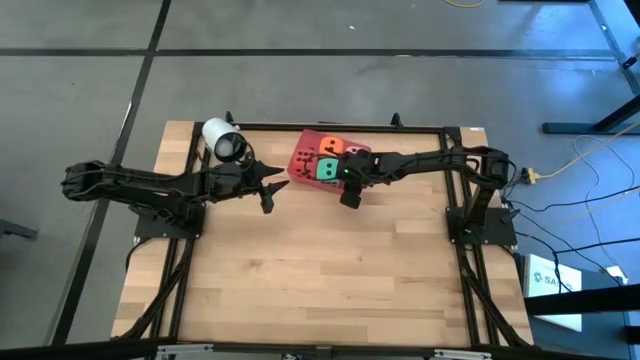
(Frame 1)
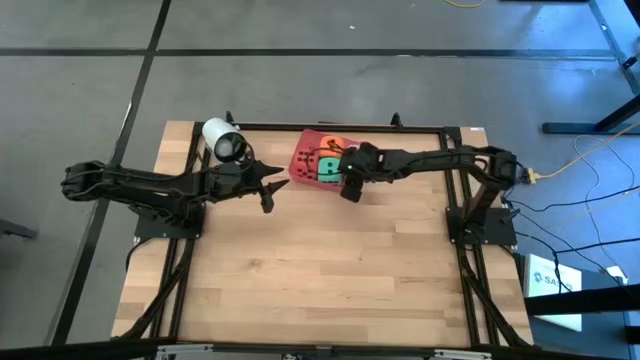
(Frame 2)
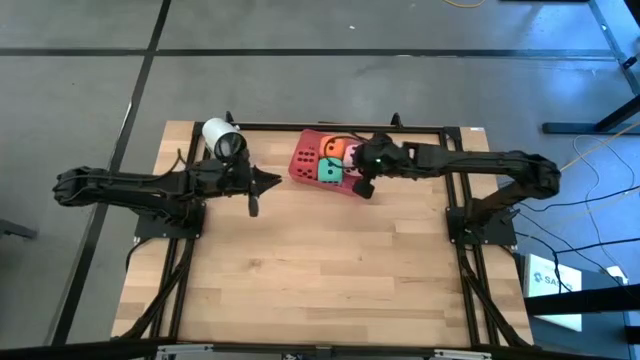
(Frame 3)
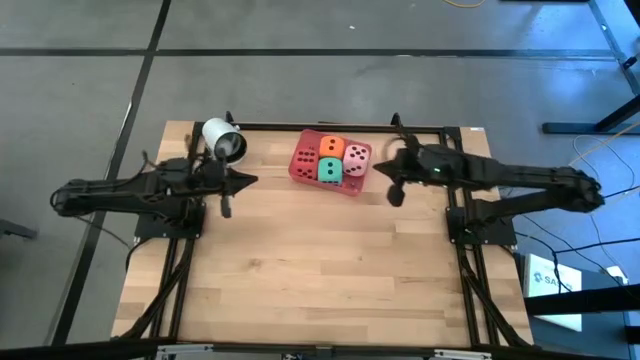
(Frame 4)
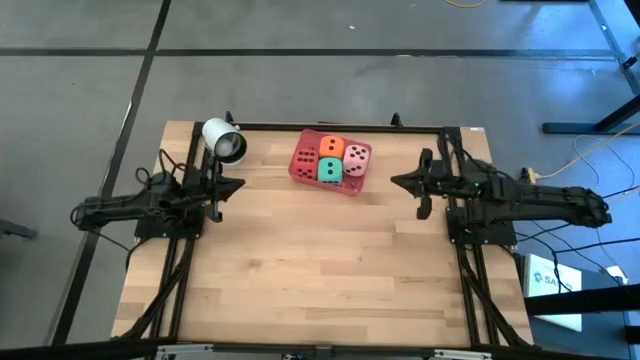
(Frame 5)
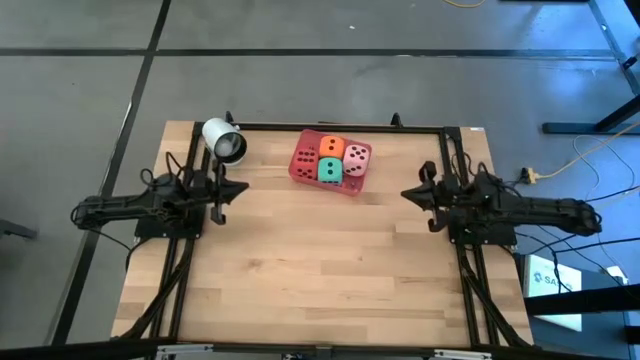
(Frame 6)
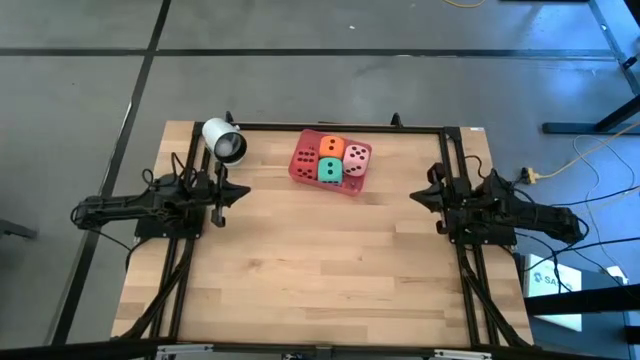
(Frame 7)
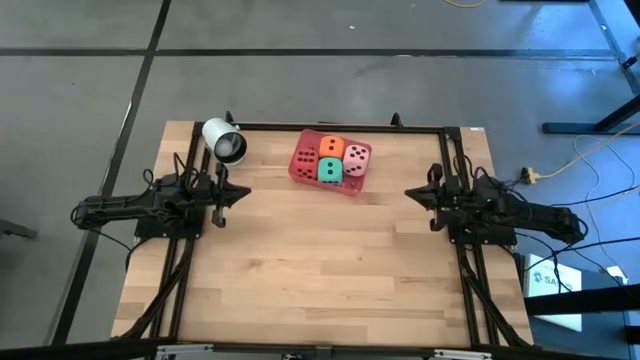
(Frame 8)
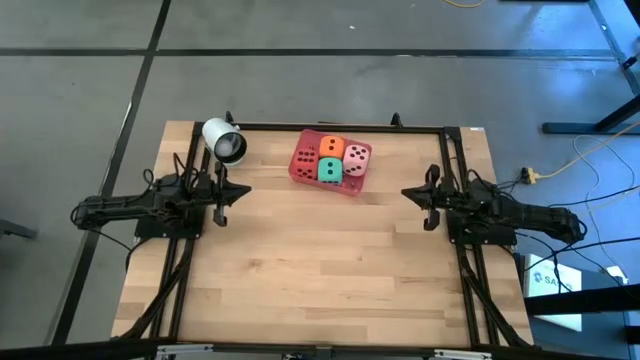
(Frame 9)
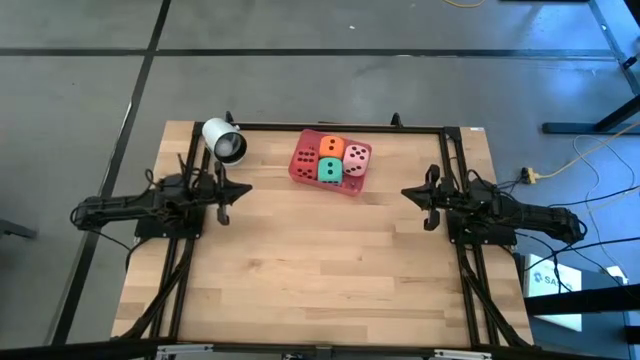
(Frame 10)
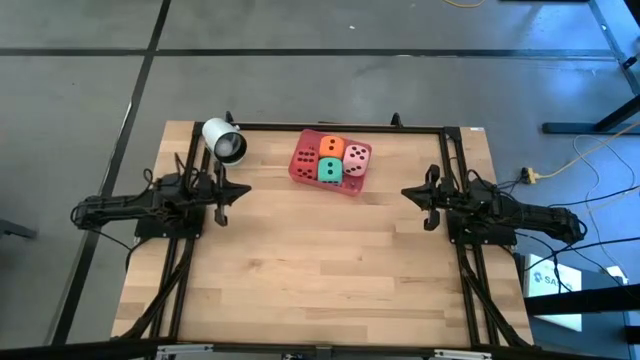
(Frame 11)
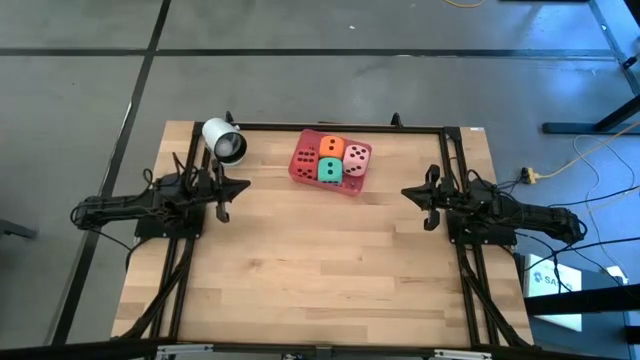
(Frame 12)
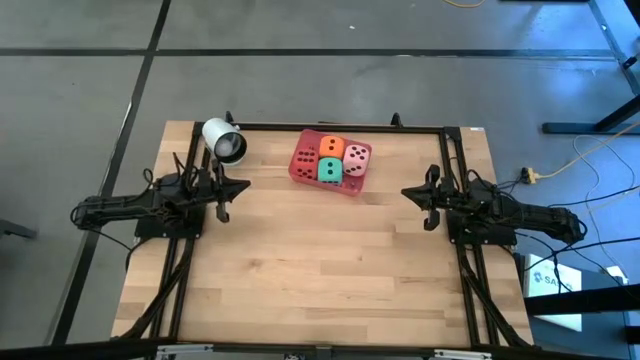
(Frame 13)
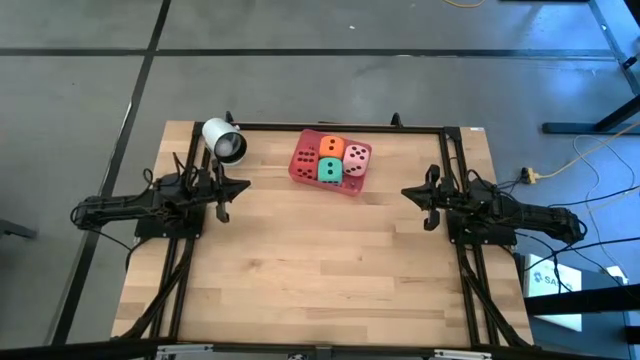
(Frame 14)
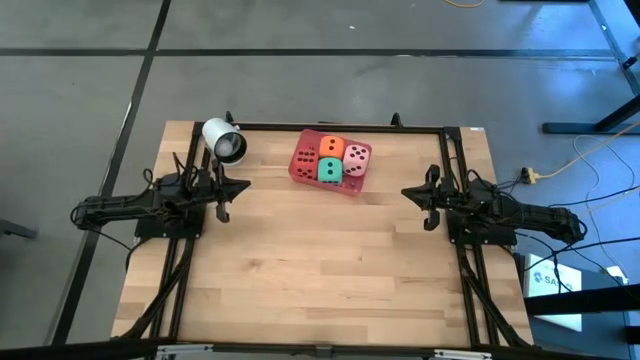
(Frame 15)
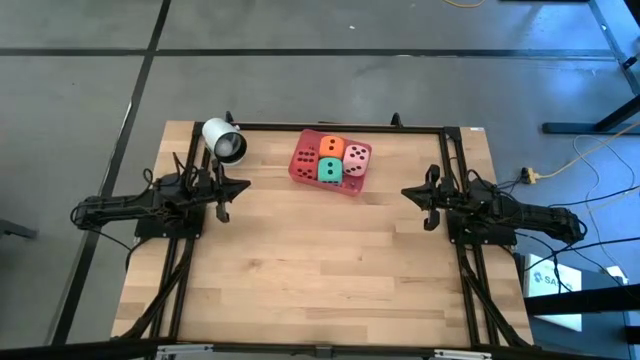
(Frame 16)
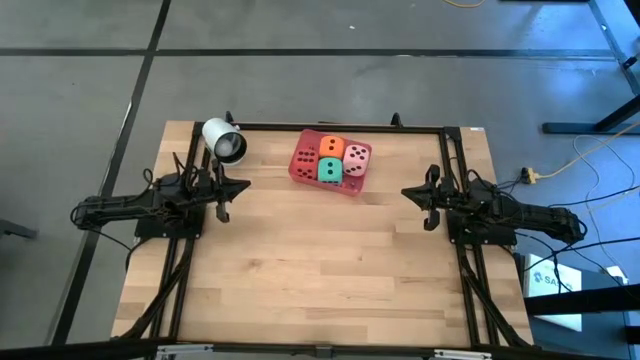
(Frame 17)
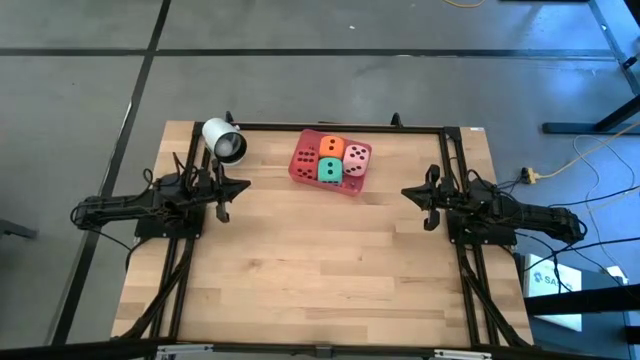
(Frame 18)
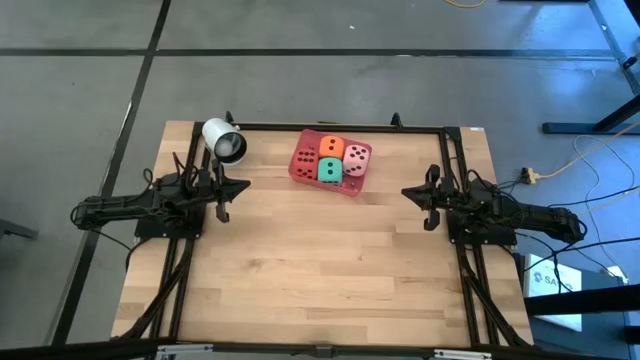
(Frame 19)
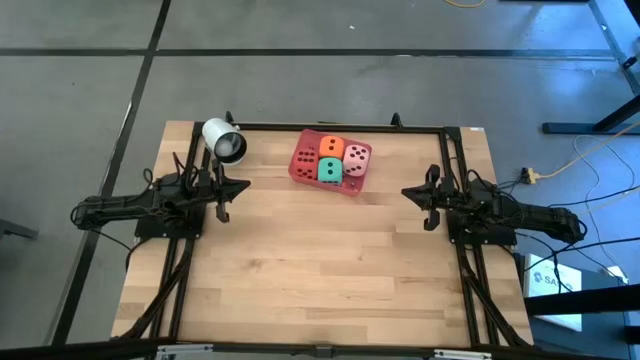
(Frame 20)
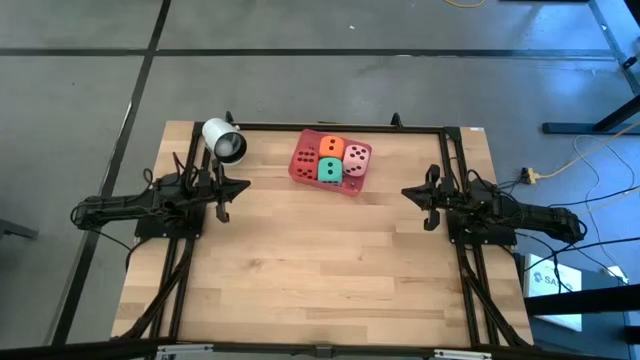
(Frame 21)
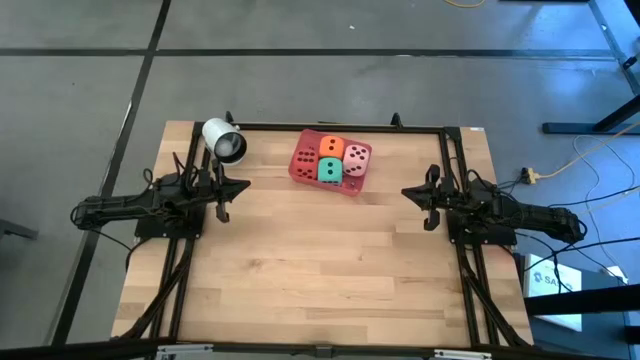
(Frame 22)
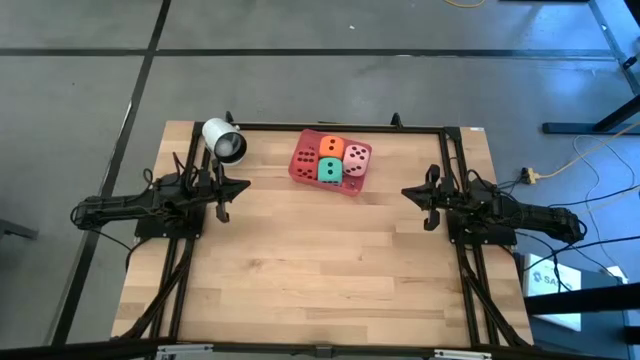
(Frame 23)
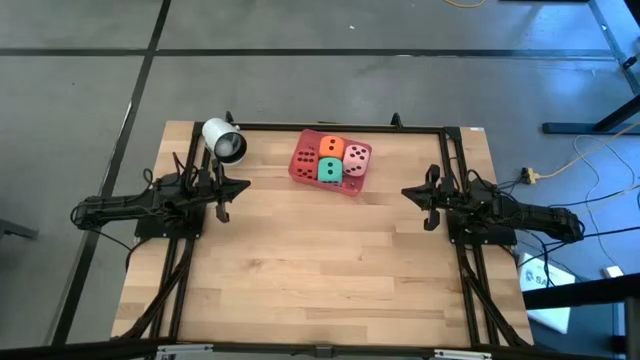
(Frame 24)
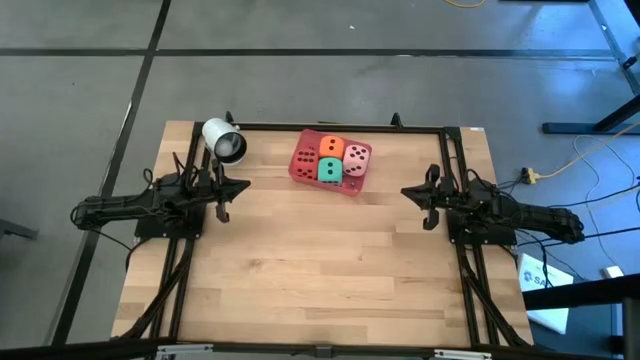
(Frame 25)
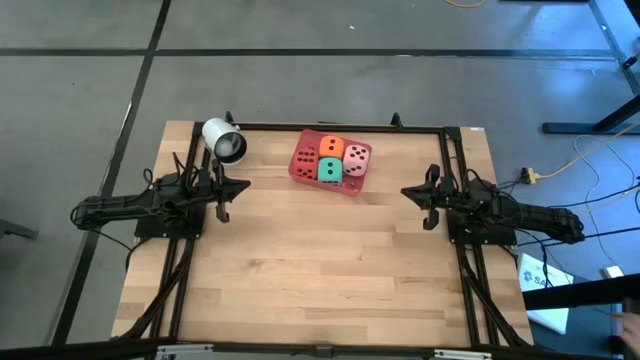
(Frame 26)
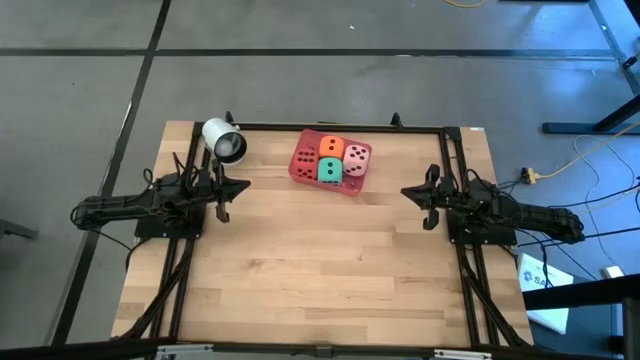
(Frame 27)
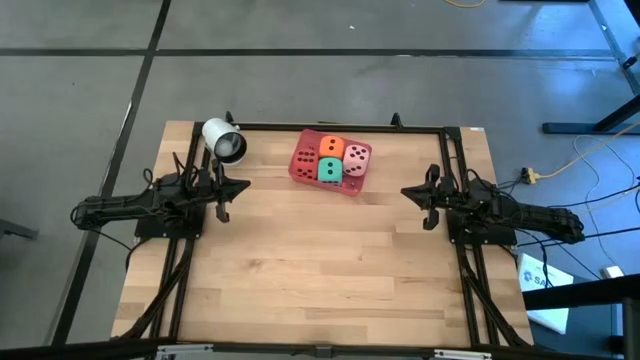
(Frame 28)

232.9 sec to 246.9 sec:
Task: Pick & Place Dice
Return to Home Position

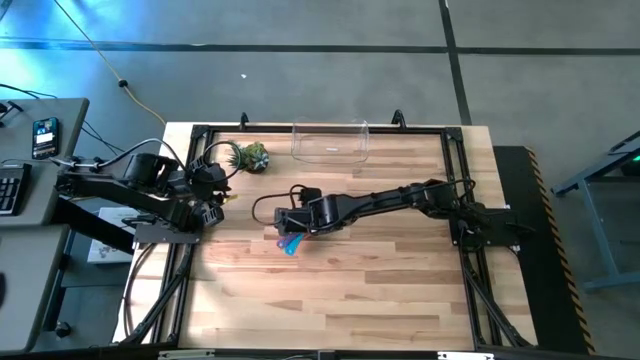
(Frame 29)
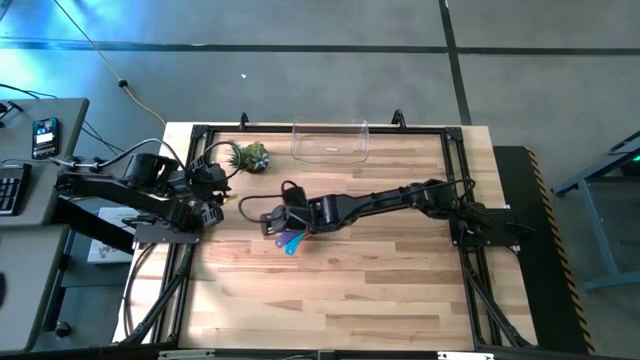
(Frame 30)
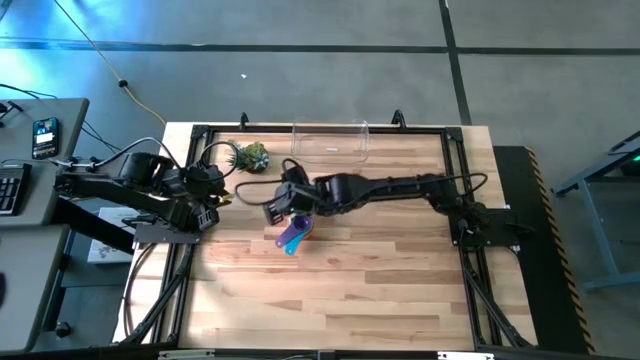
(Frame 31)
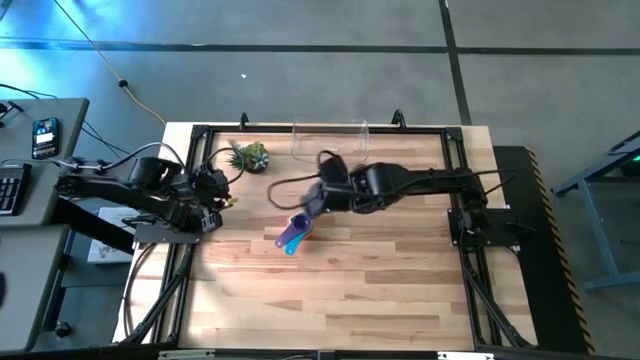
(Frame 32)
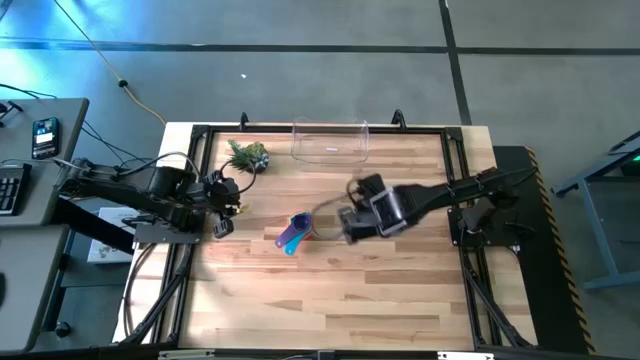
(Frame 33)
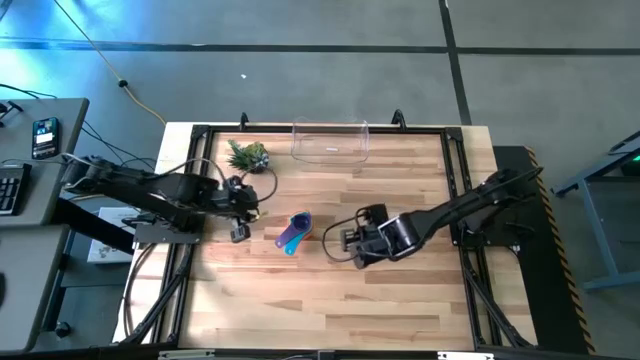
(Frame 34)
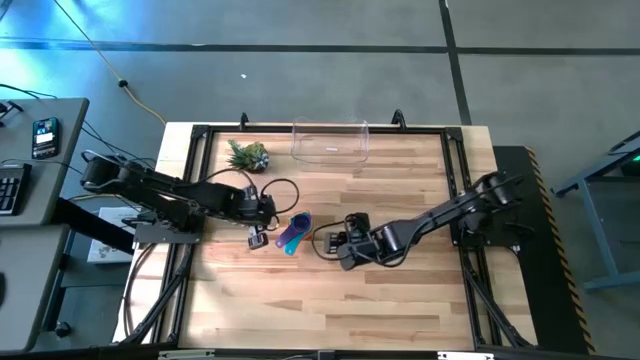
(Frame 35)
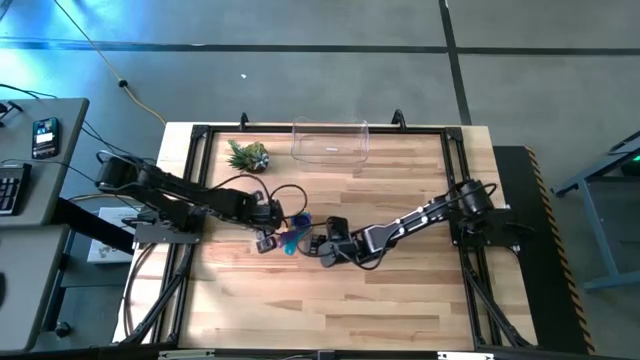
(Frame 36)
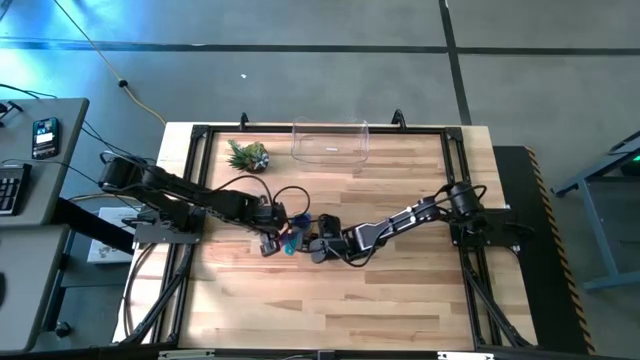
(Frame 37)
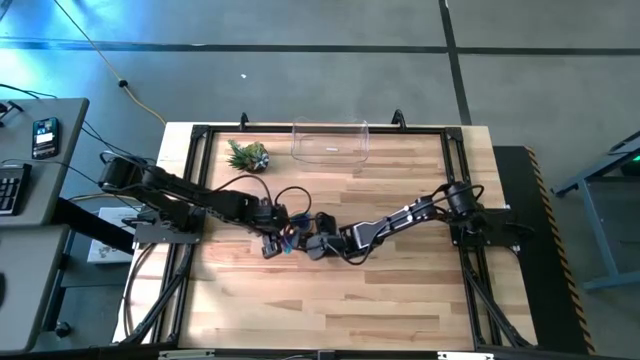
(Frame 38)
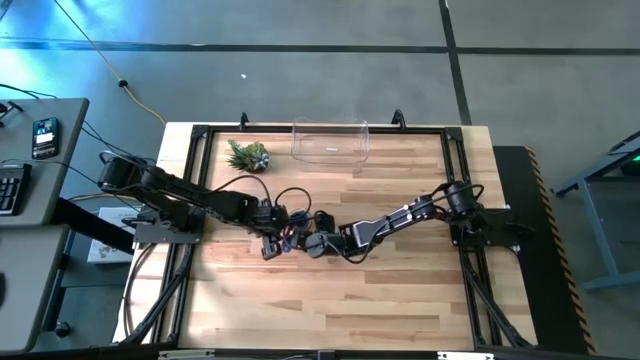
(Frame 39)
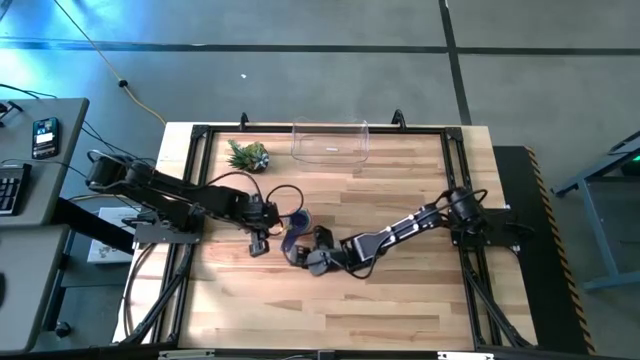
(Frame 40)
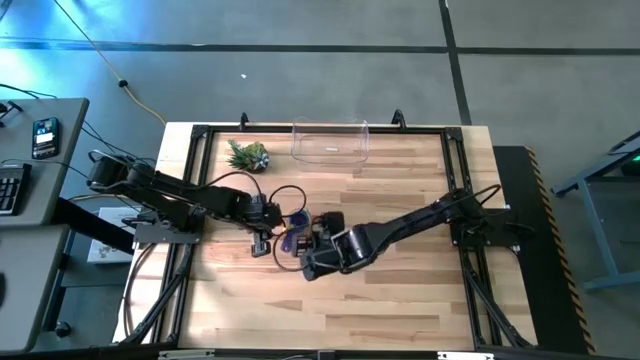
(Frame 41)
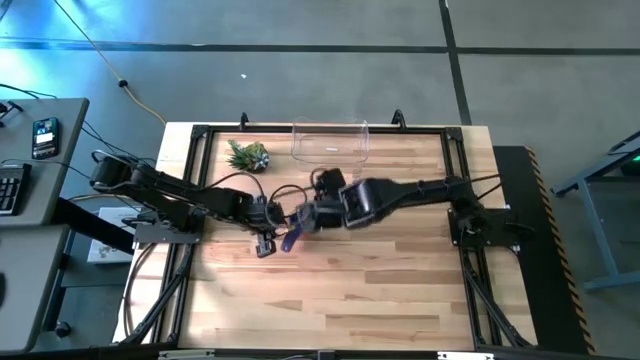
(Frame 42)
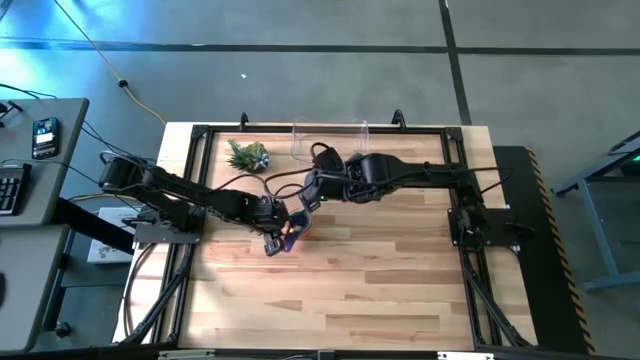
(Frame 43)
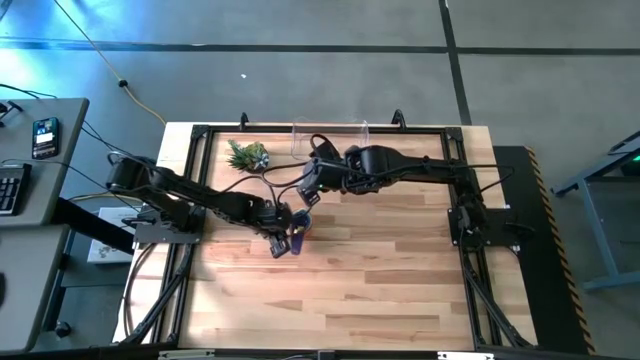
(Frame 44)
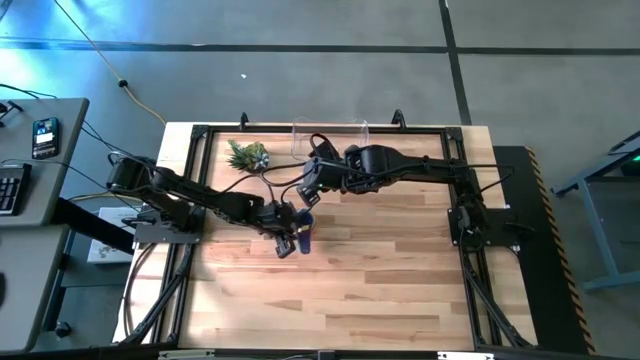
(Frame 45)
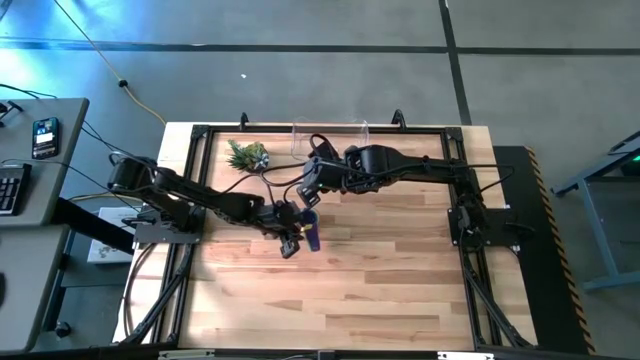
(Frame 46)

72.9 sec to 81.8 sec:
Task: Nest measuring cups in basket
Adjust the stacked measuring cups
